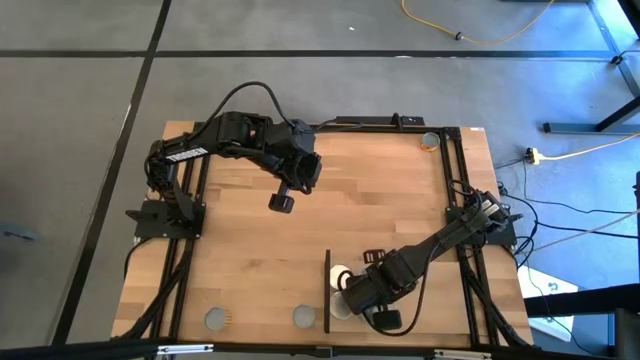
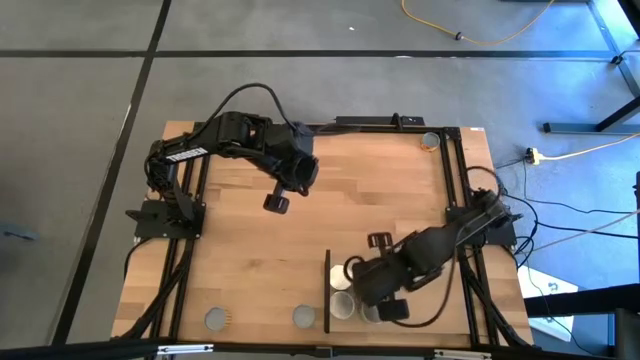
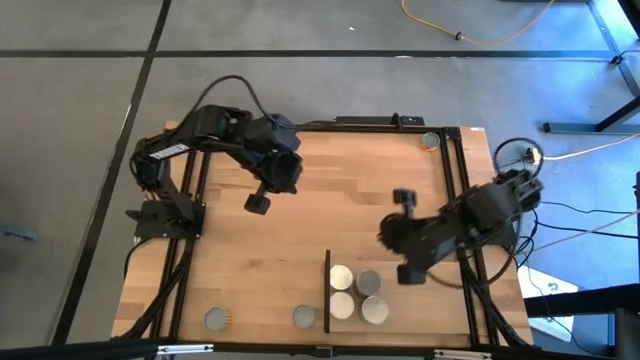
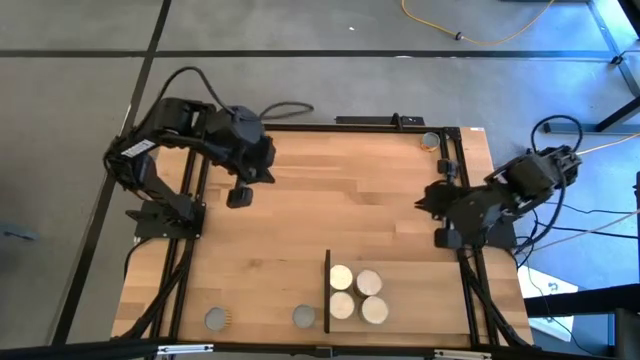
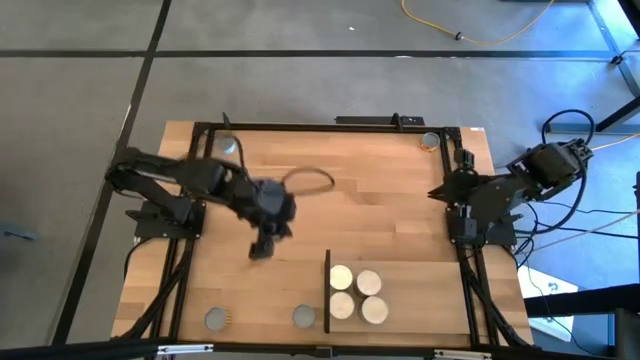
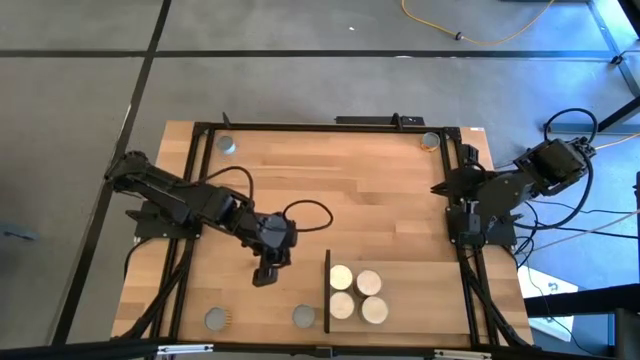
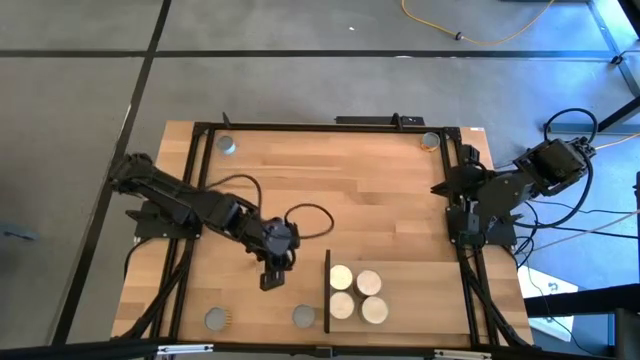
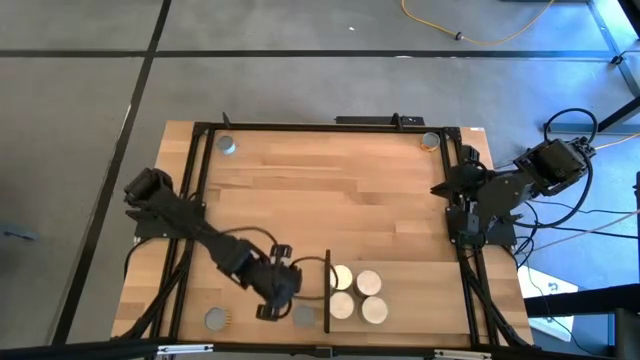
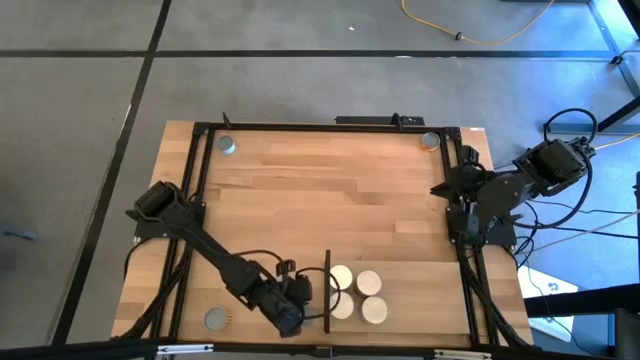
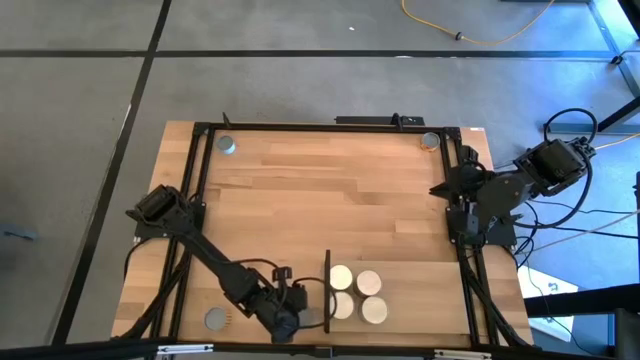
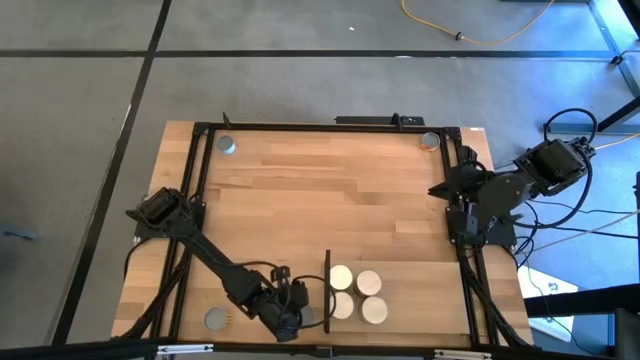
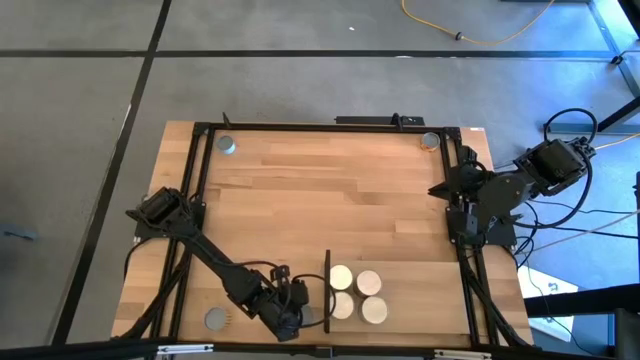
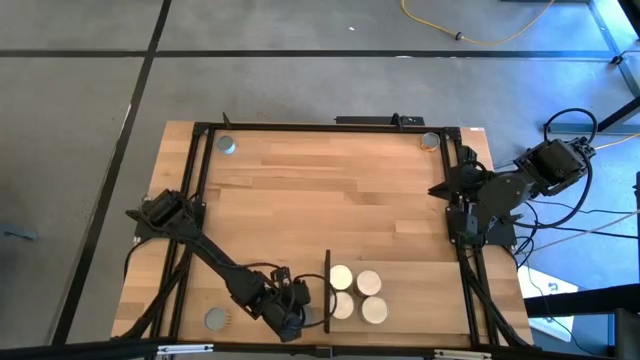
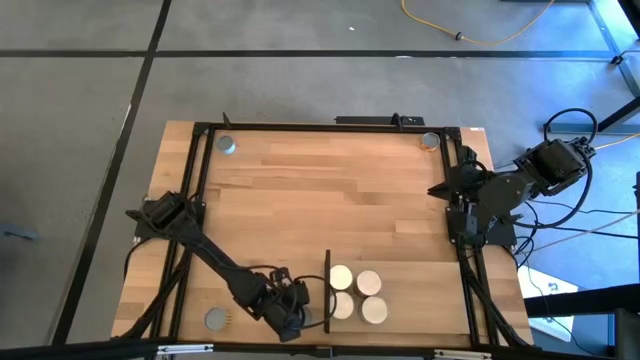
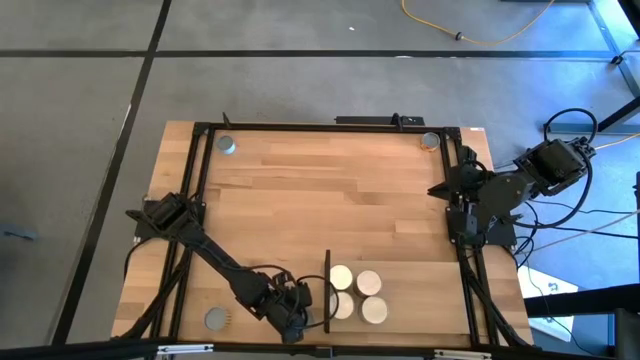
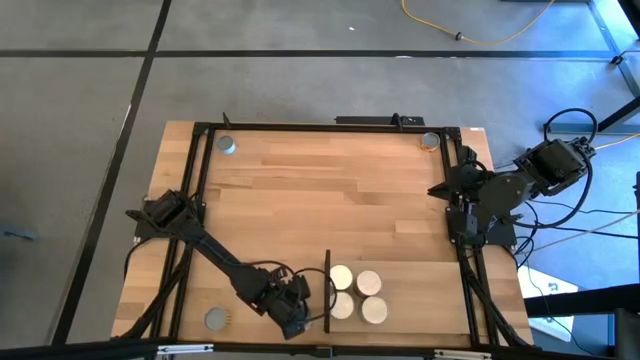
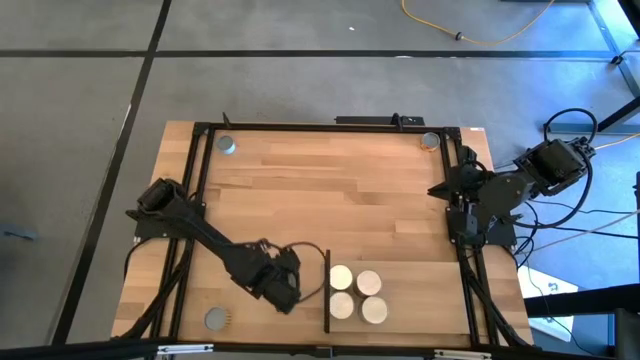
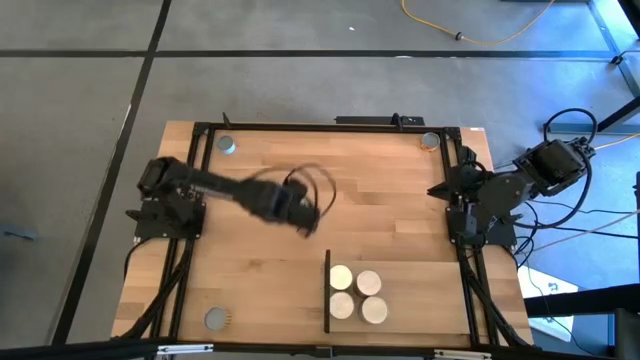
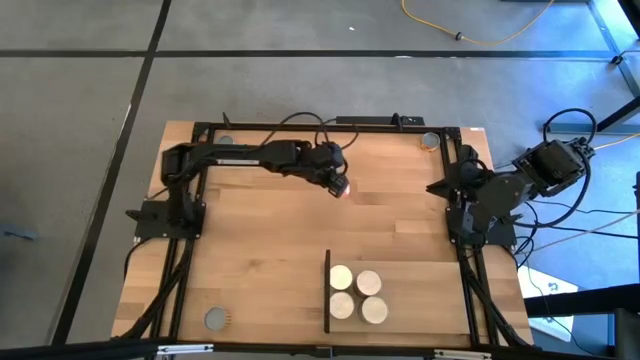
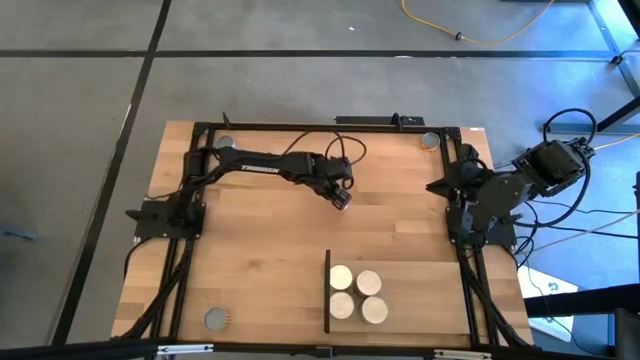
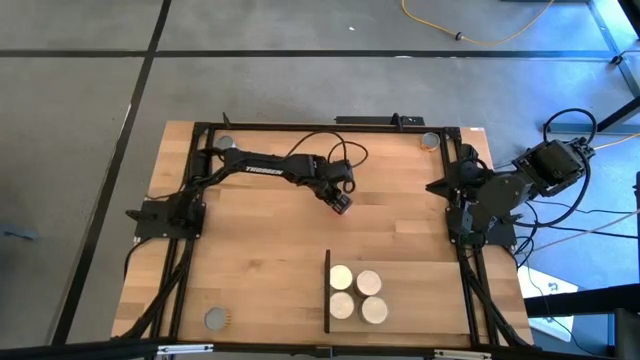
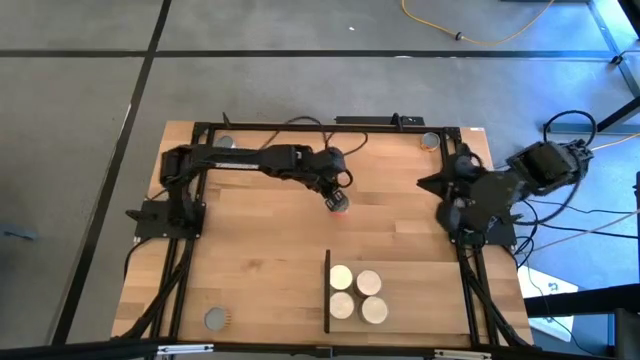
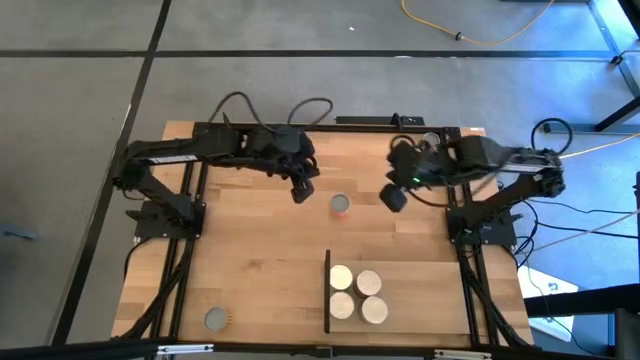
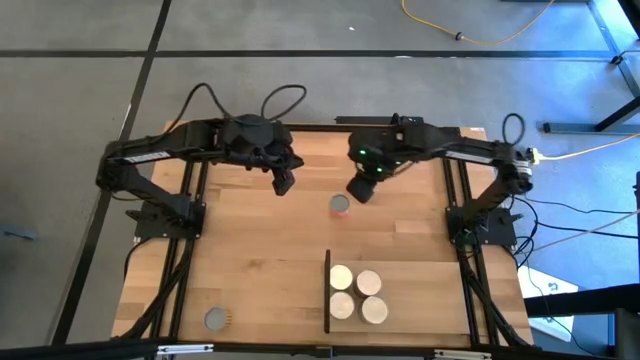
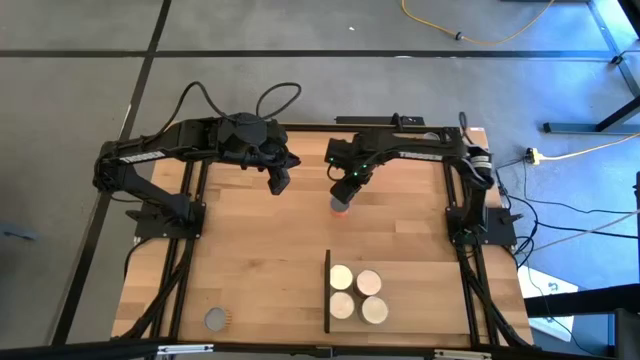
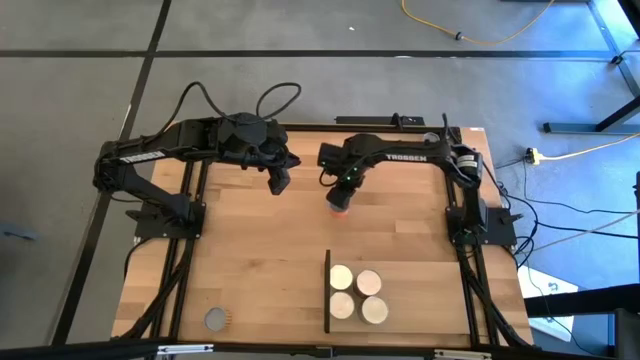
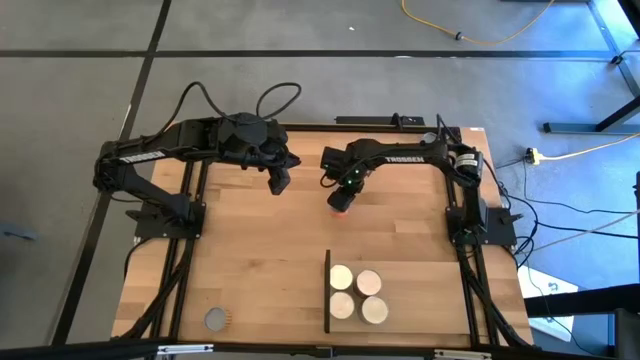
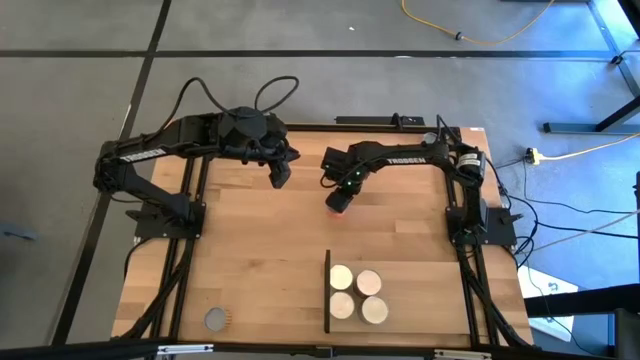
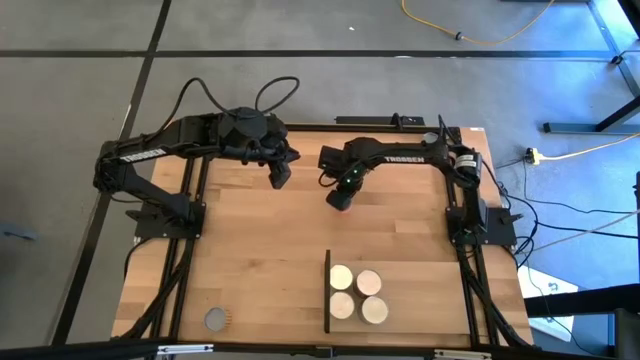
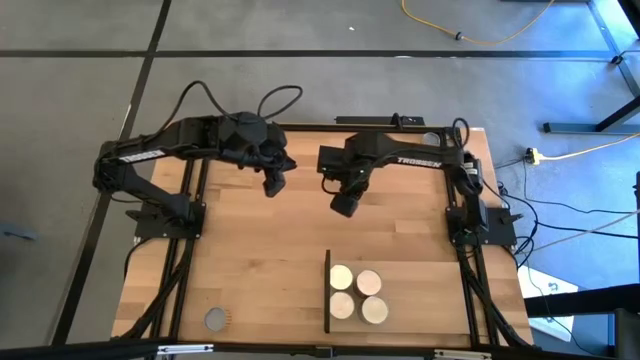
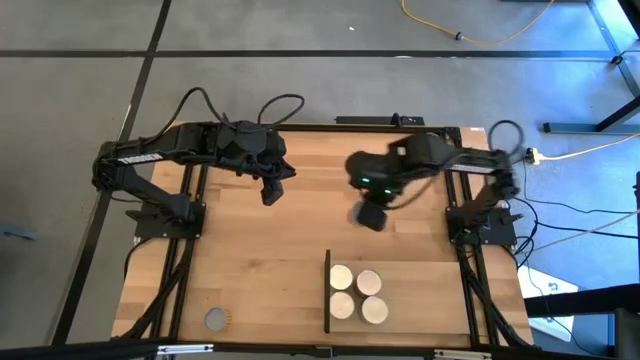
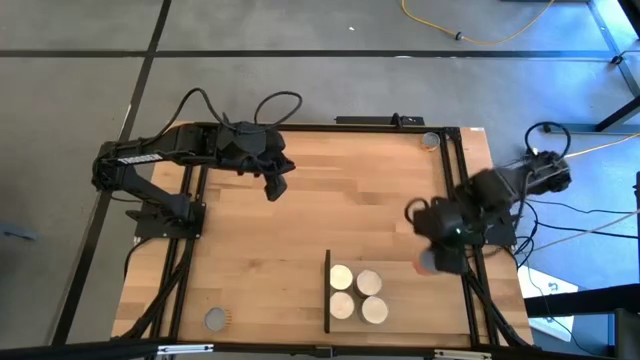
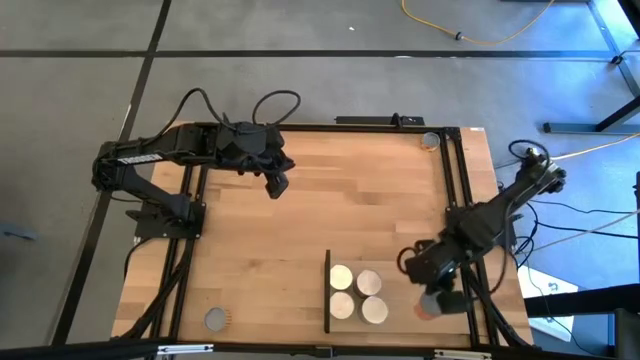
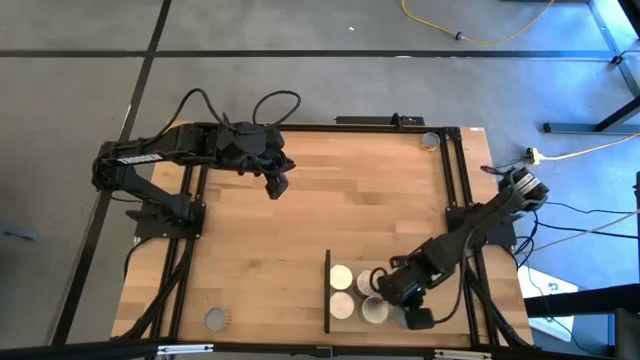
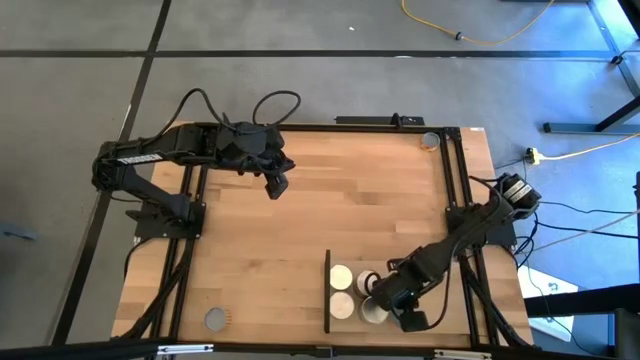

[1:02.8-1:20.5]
Task: Pick and place cans onto a shelf
Put the canned diced tomatoes on the shelf

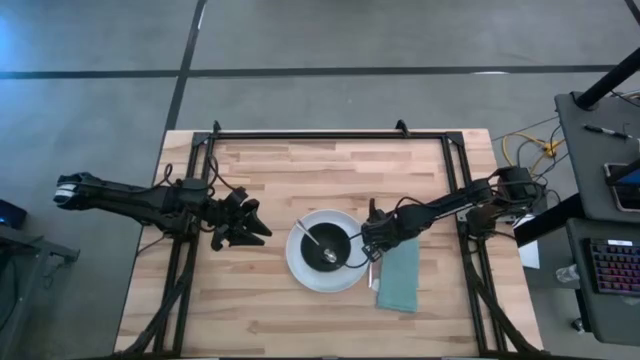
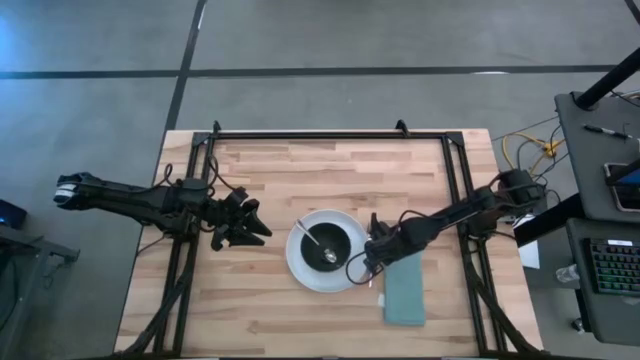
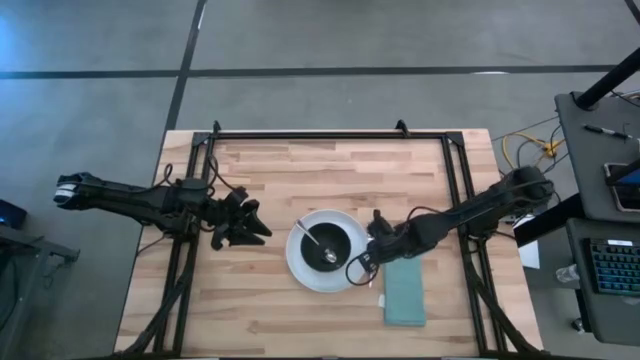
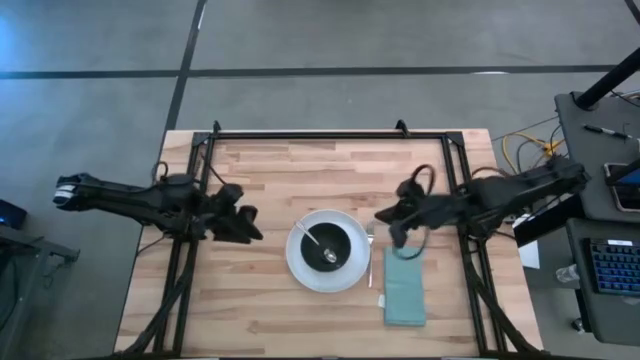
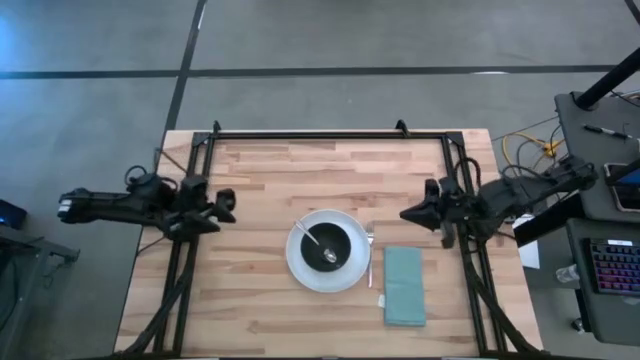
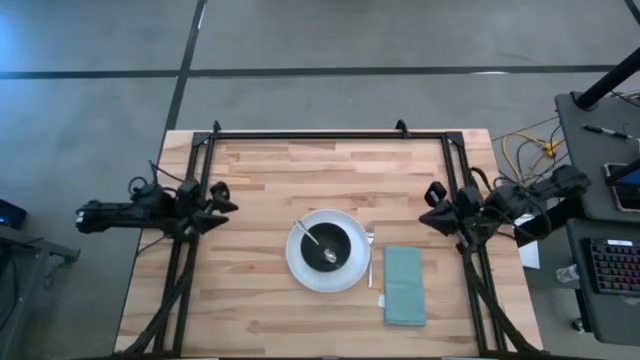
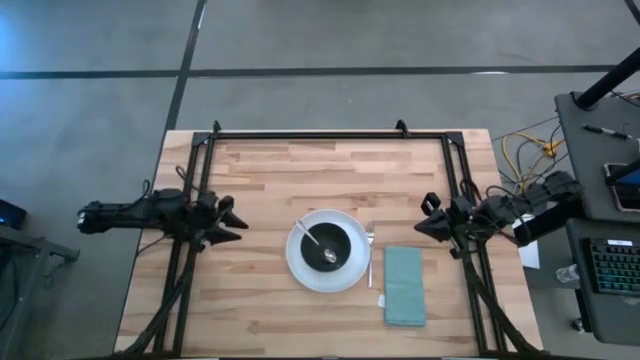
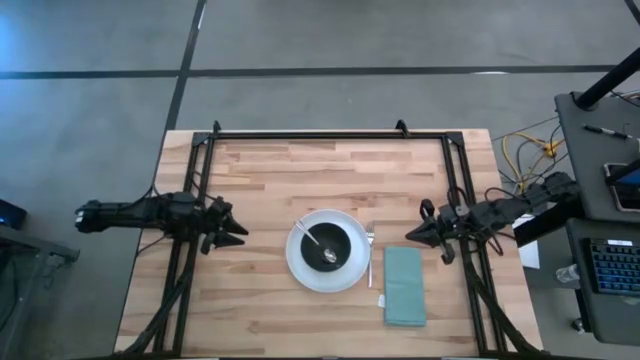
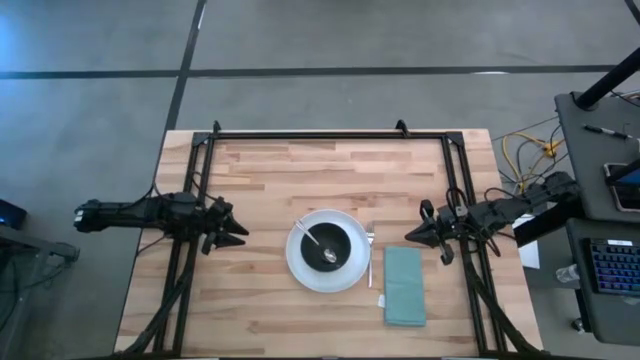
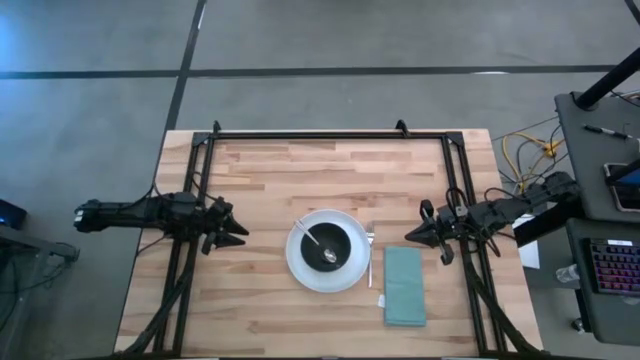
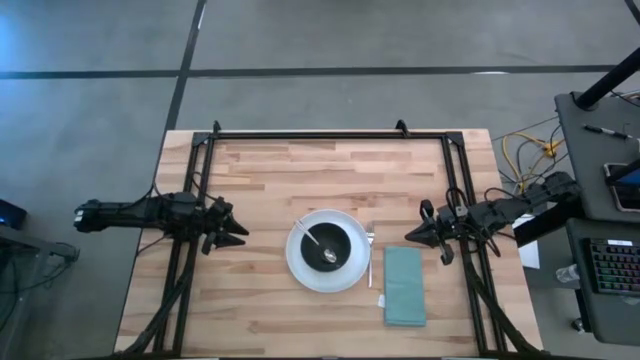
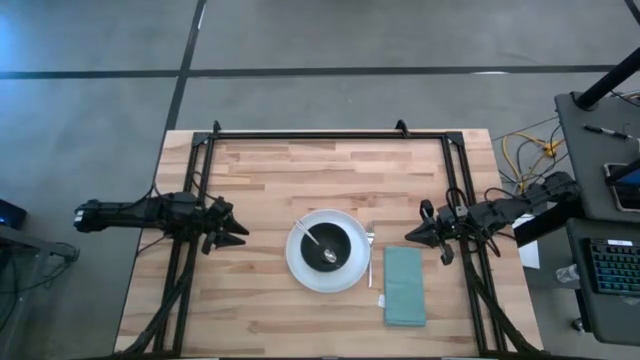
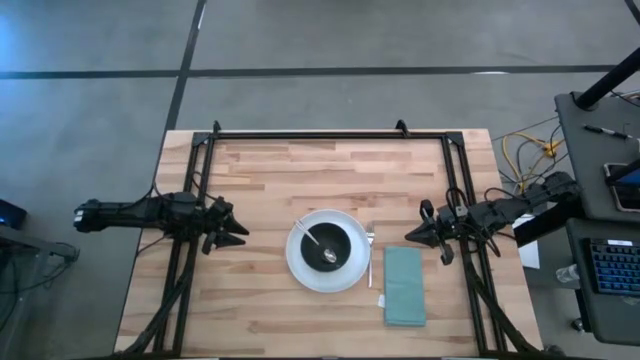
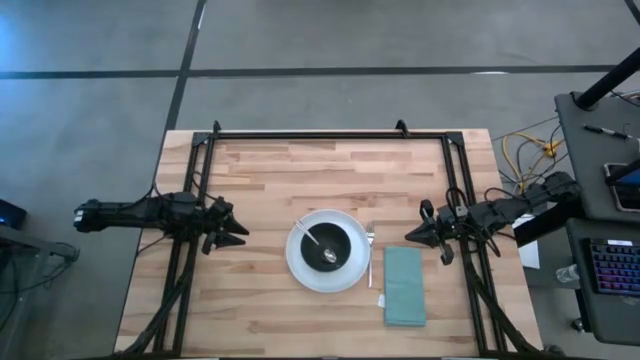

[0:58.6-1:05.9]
Task: Set table place
Return to Home Position
